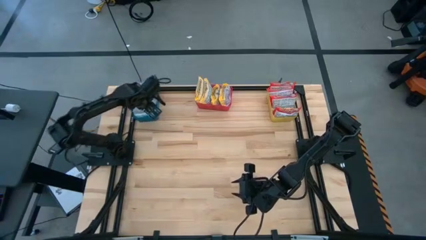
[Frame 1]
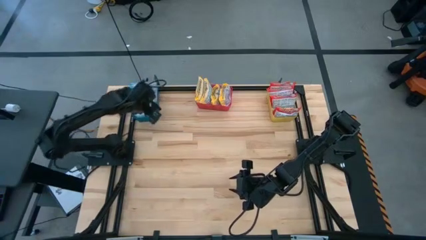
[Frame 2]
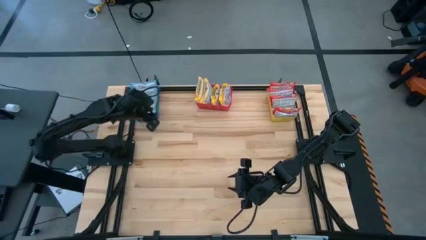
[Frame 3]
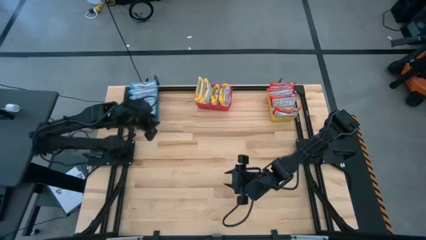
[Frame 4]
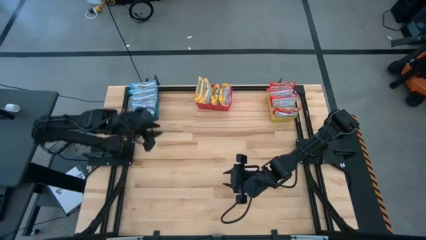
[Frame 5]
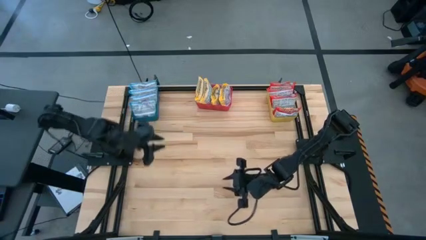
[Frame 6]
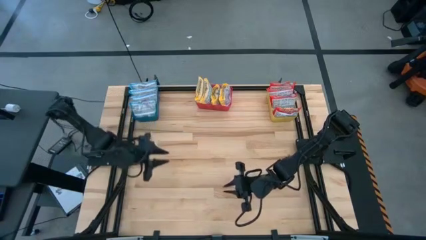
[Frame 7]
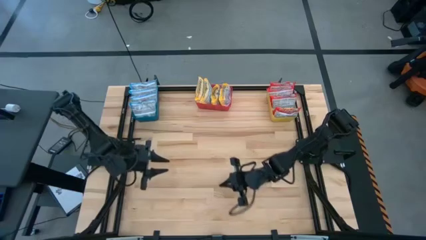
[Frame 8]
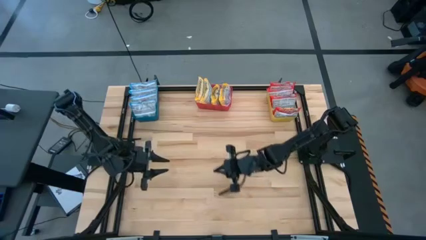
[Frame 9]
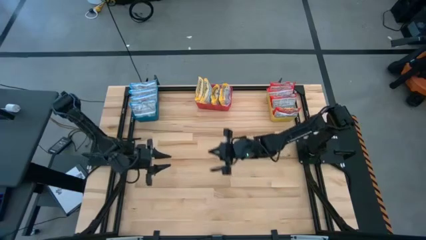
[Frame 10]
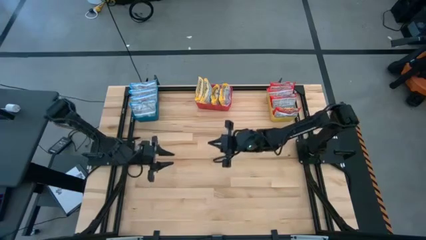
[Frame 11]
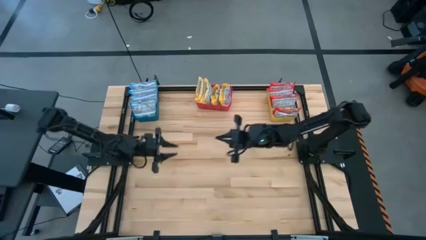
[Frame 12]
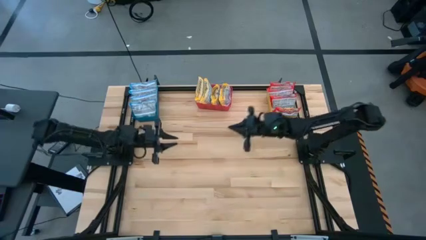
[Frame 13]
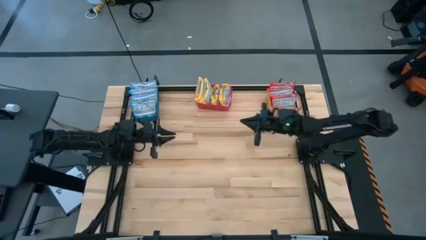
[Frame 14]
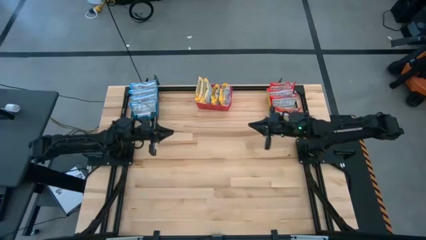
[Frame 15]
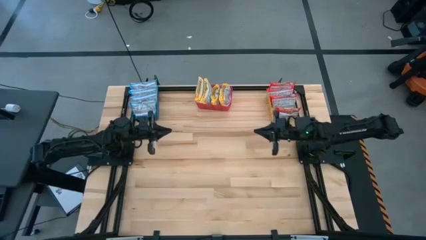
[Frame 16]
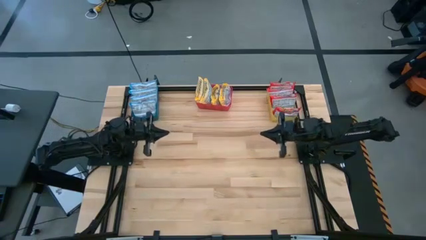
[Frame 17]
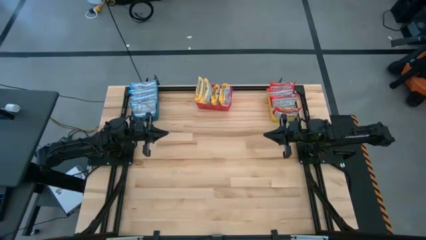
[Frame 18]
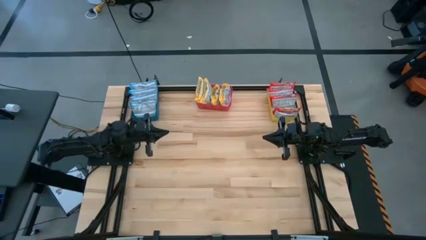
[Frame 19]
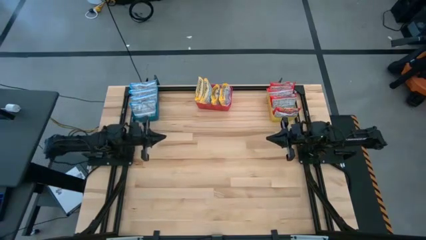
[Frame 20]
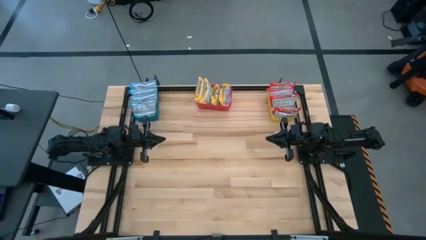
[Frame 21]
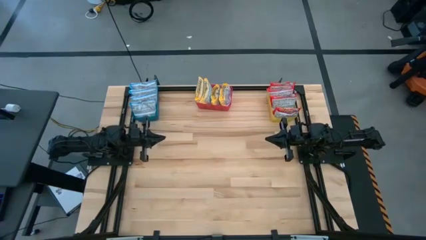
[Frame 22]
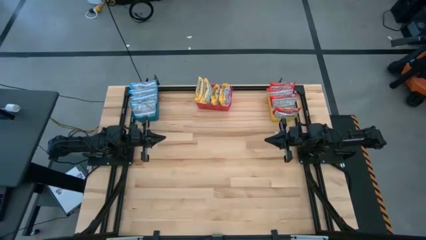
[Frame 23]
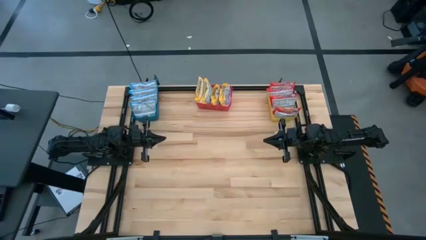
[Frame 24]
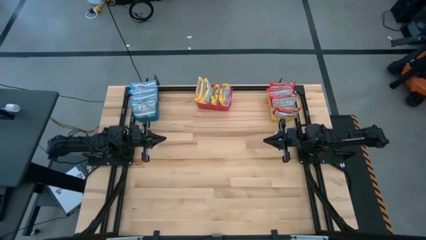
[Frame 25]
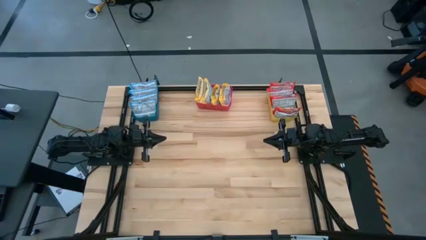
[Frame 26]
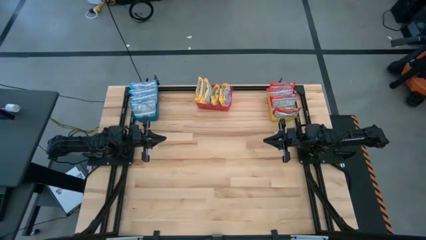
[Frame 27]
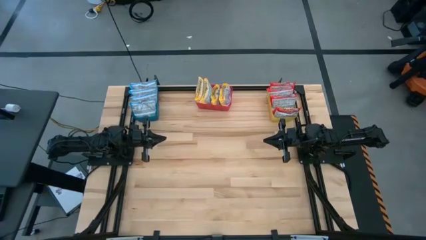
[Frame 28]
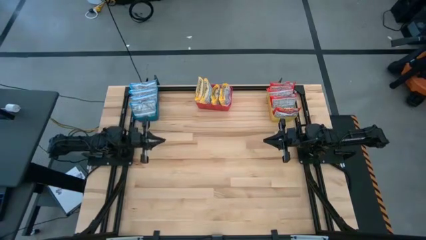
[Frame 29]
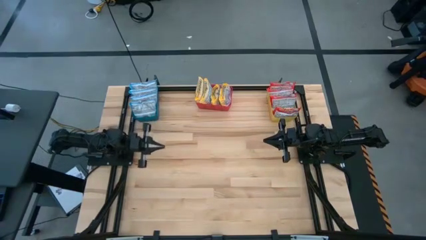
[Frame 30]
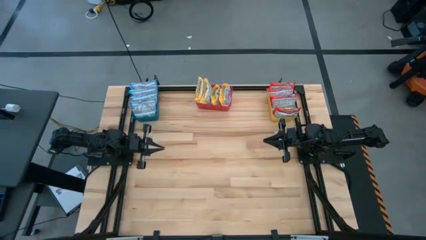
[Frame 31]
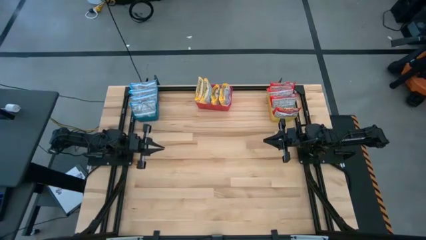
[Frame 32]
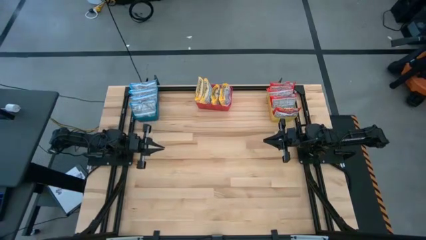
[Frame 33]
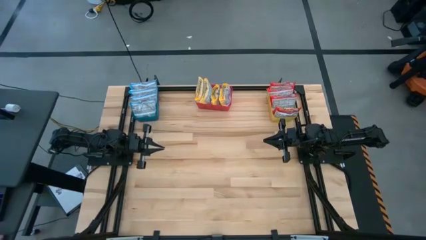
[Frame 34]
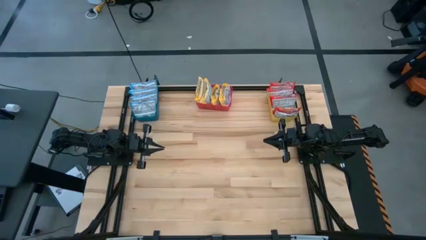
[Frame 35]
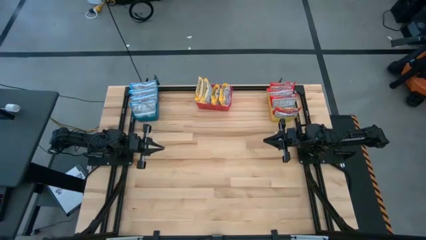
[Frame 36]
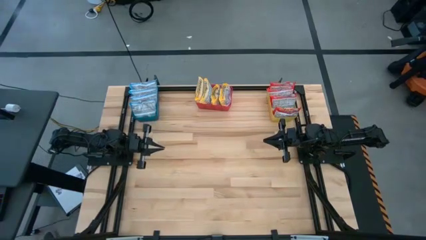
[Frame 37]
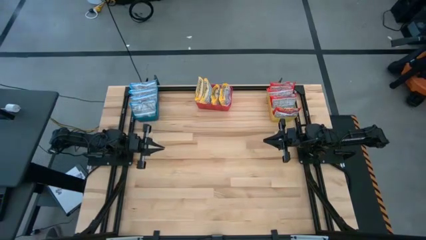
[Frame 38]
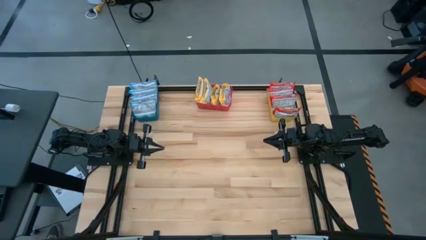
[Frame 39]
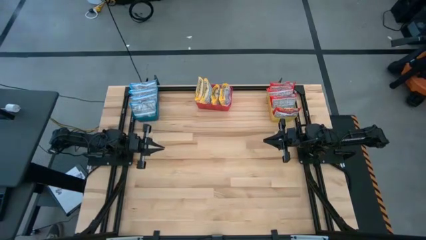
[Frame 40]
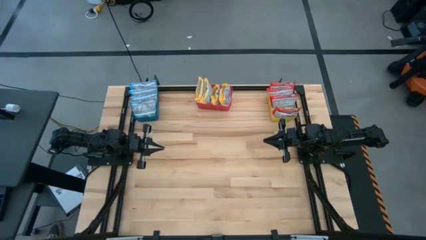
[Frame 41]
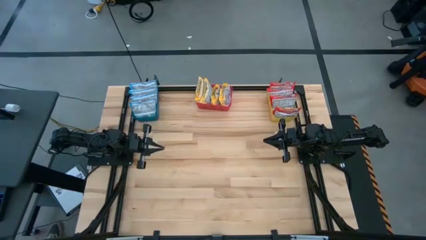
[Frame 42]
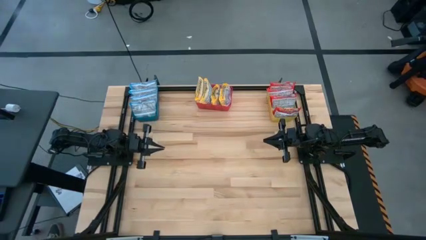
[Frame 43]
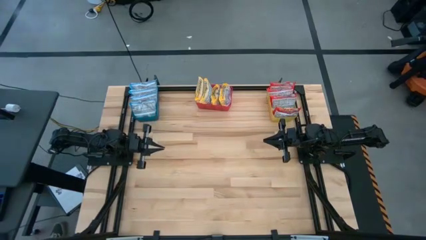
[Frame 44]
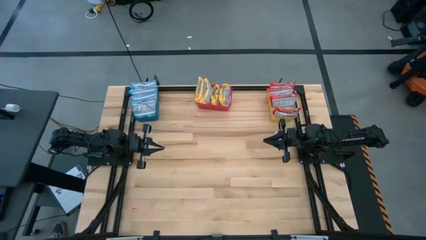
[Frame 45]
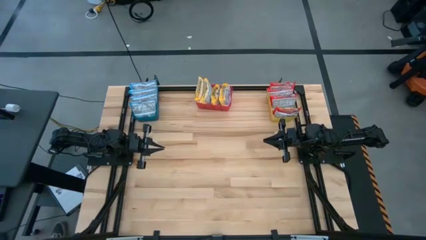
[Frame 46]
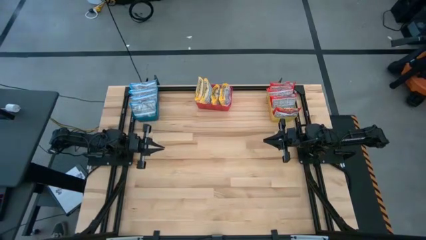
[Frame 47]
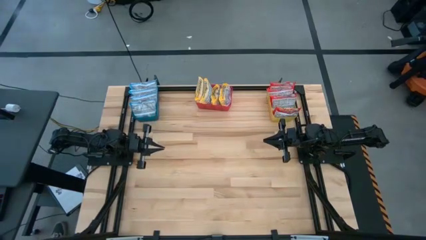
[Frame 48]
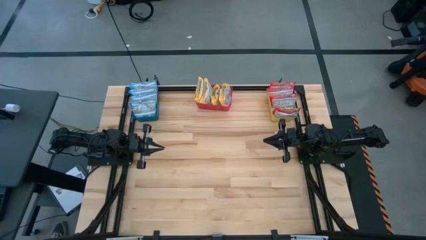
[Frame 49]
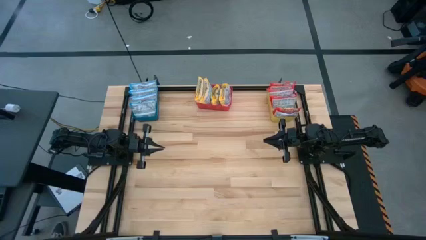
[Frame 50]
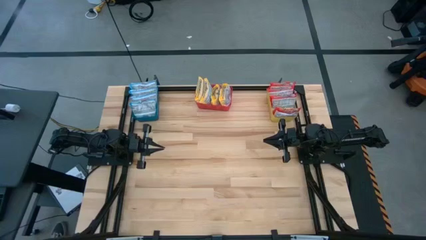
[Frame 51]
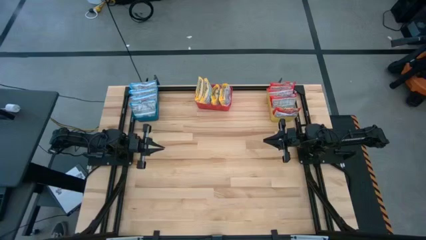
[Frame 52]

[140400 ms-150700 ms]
Task: Sort Maruchan noodles
Return to Home Position
